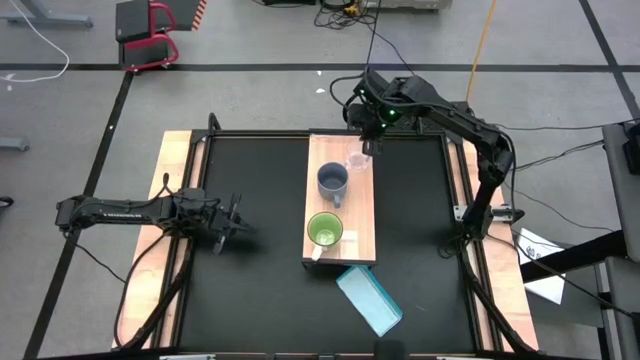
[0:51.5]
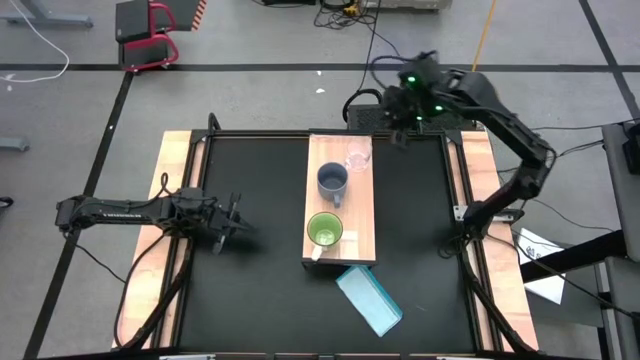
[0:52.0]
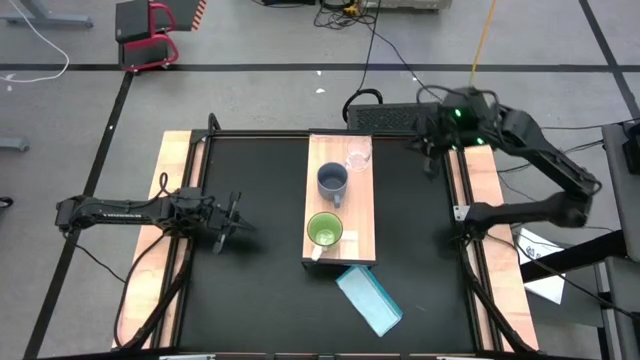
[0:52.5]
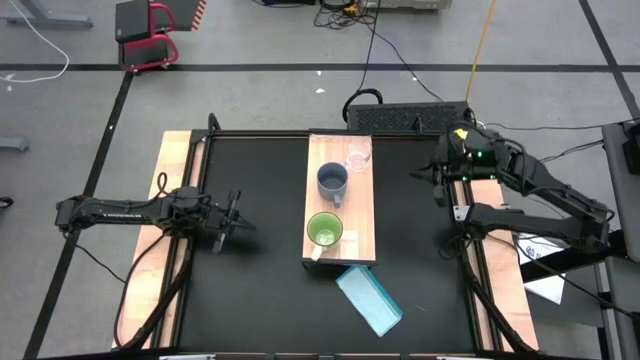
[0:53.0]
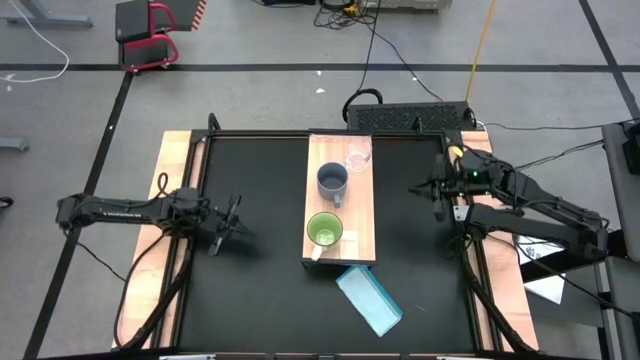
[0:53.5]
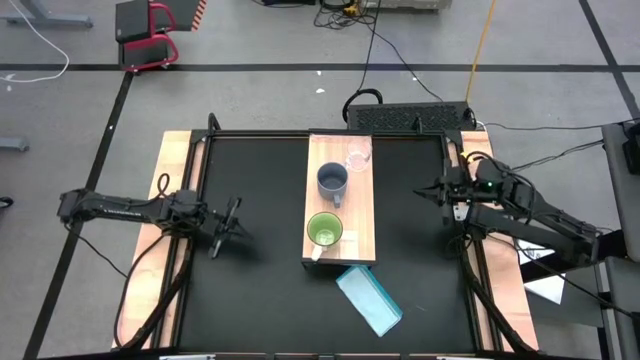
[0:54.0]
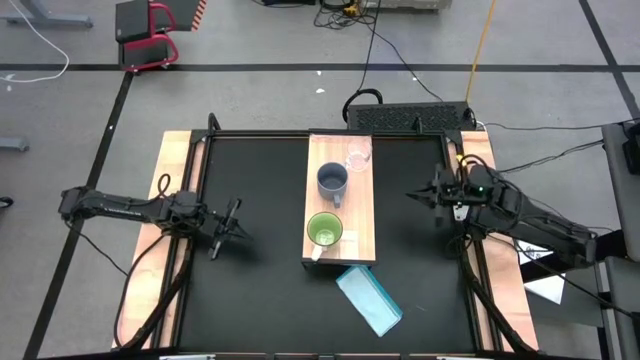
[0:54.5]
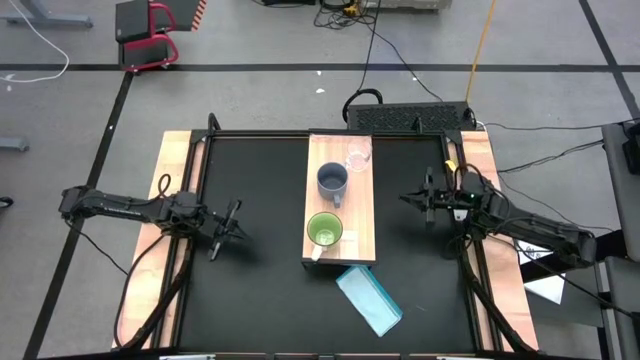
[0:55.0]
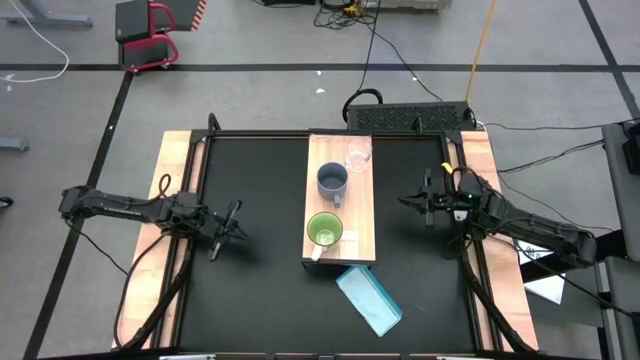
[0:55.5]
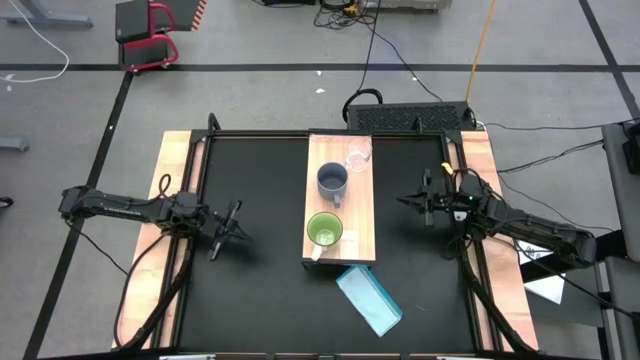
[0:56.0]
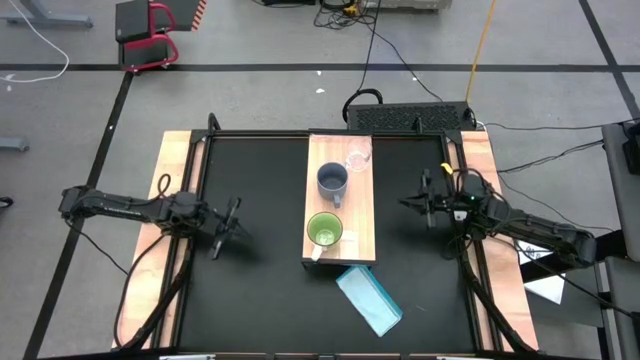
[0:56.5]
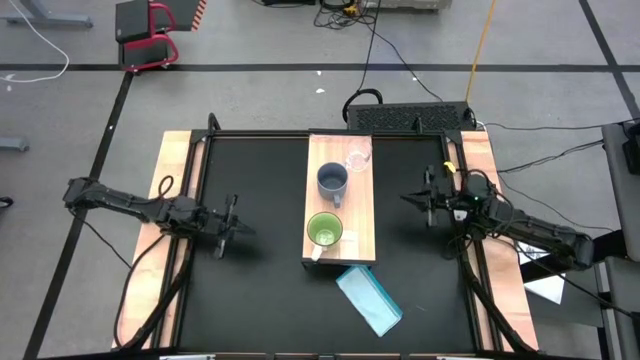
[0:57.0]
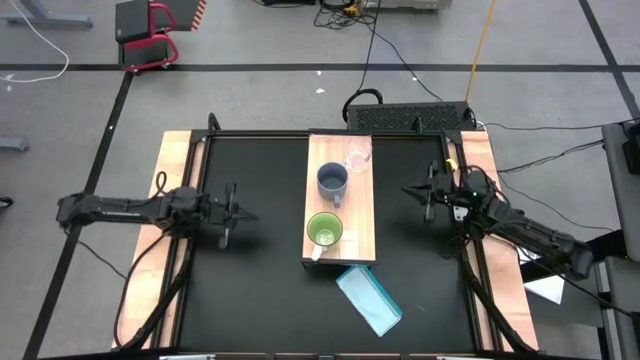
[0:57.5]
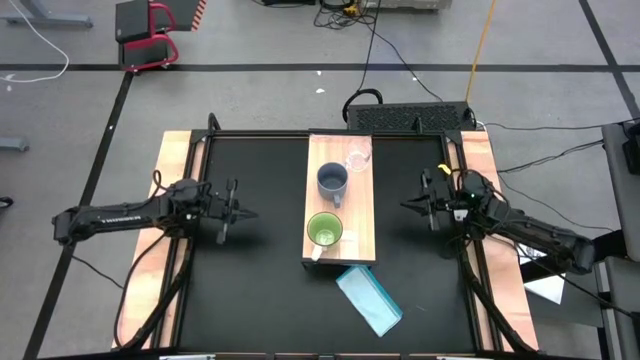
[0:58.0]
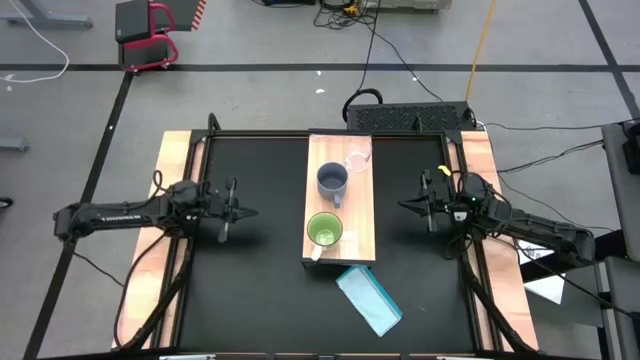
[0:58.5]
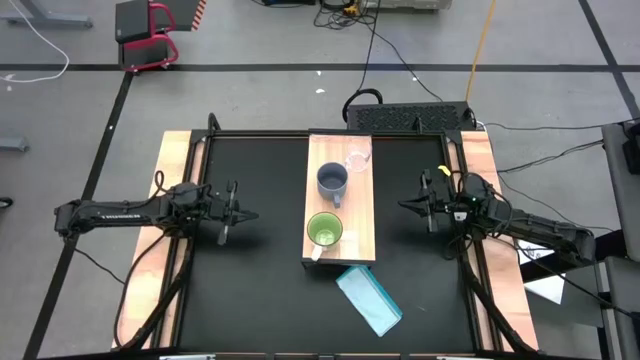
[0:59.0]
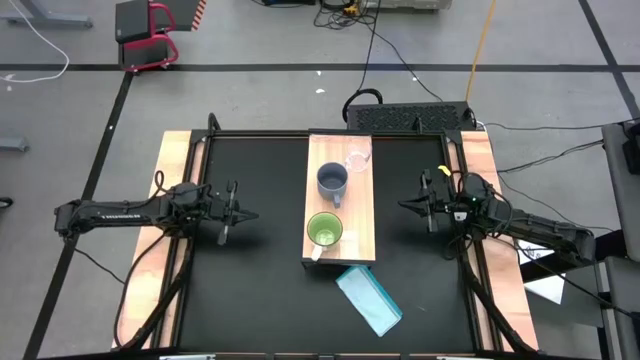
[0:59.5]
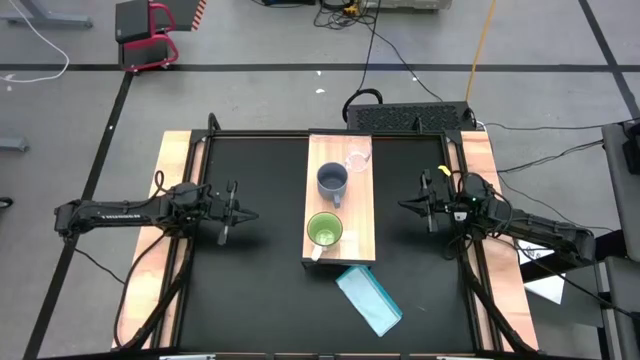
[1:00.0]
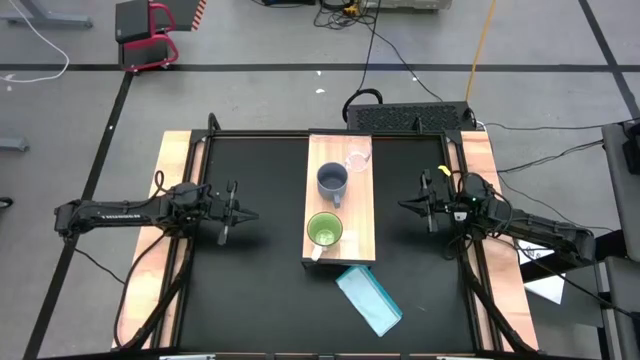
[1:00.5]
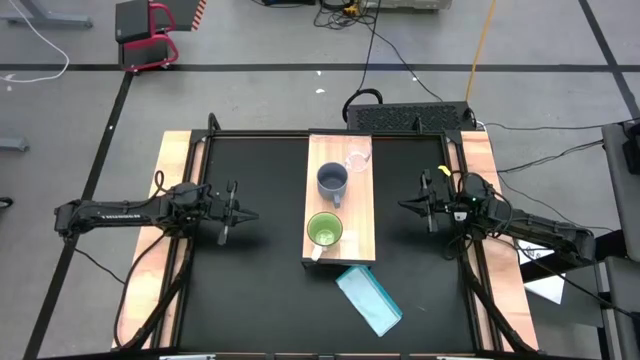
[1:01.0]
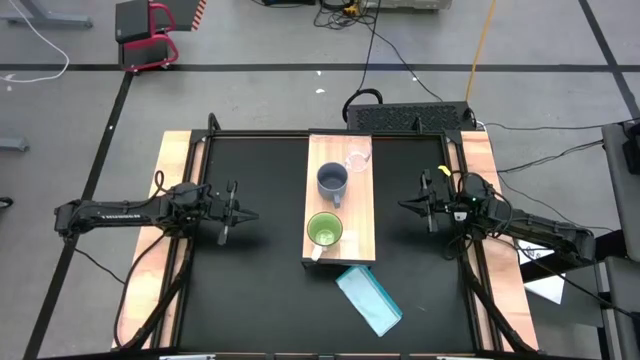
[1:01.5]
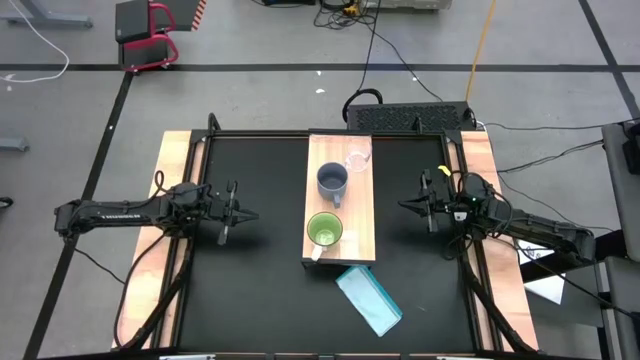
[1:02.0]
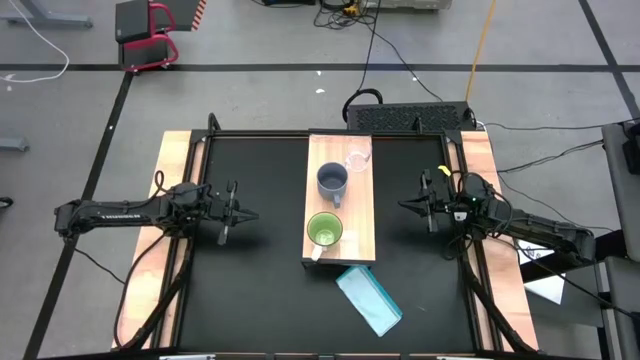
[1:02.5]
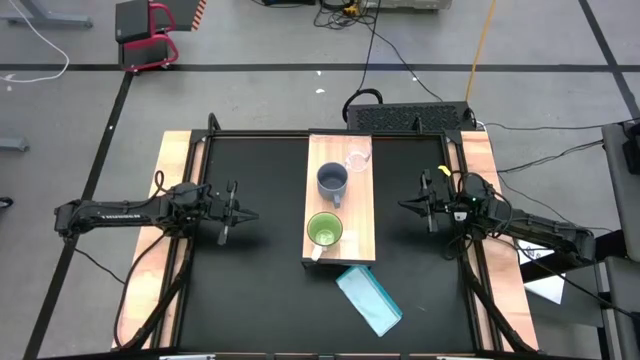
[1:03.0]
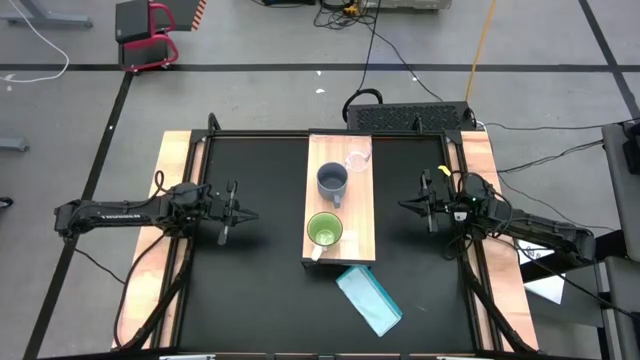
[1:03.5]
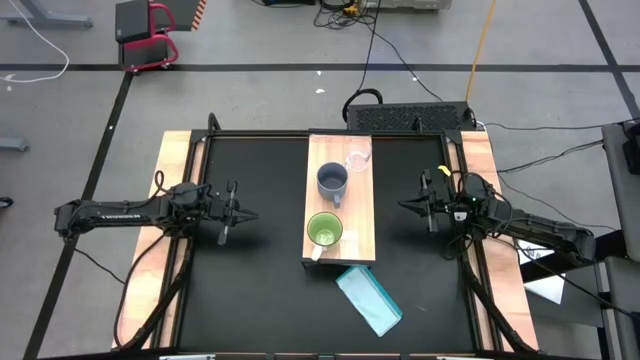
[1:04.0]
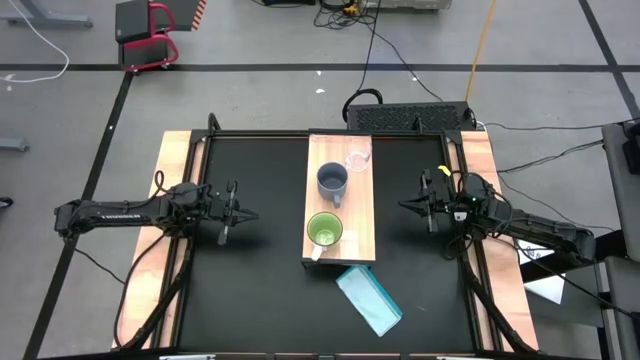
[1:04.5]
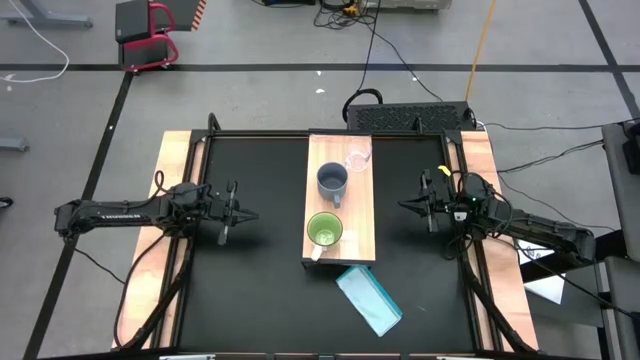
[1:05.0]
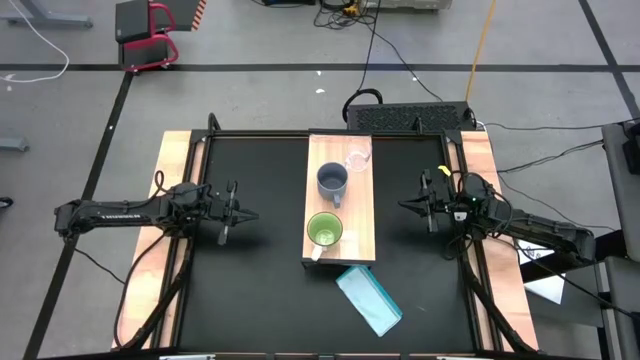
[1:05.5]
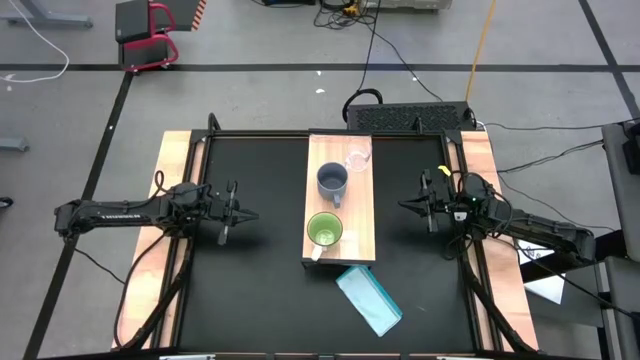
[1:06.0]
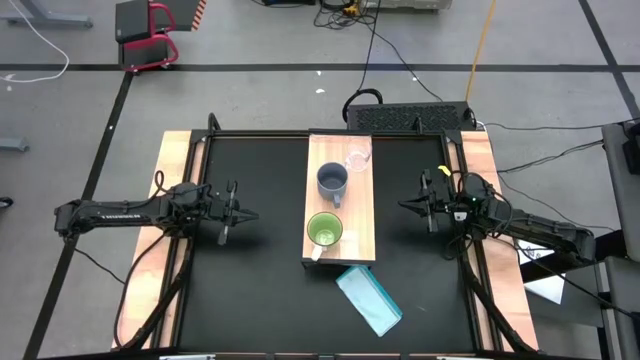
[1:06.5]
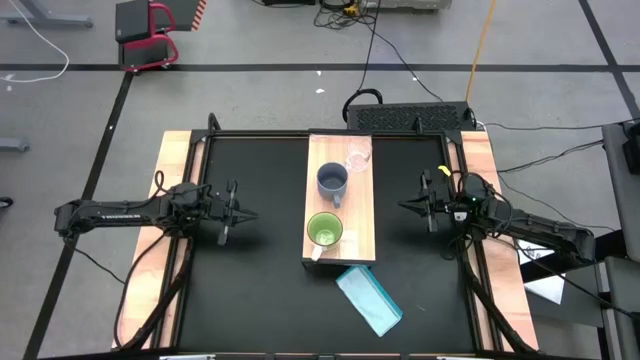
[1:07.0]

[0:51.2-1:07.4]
Task: Stack small to large cups/mugs on shelf
Return to Home Position

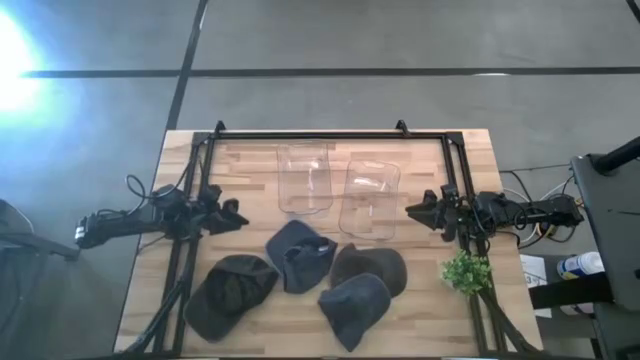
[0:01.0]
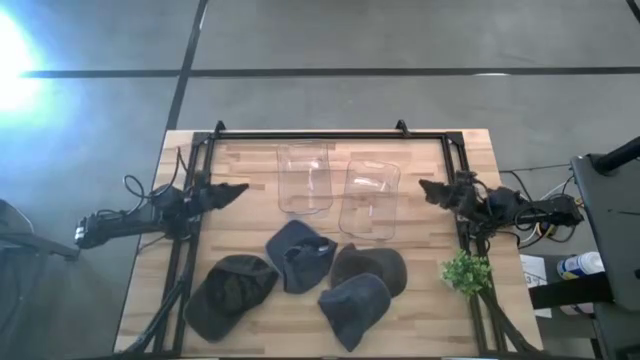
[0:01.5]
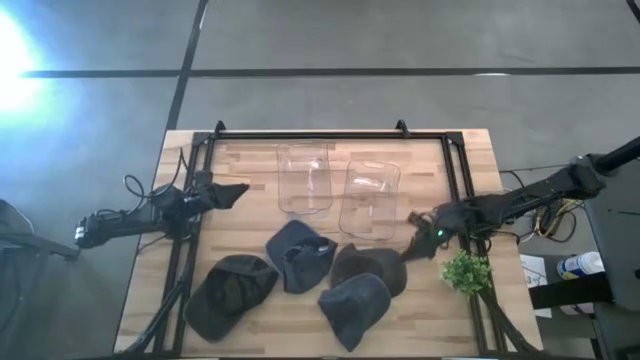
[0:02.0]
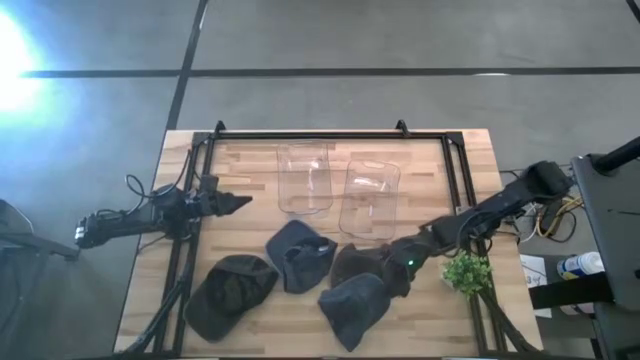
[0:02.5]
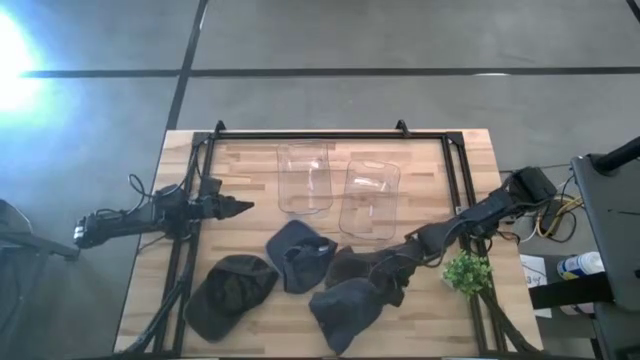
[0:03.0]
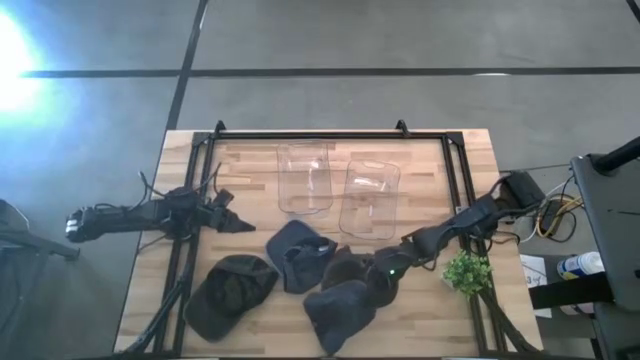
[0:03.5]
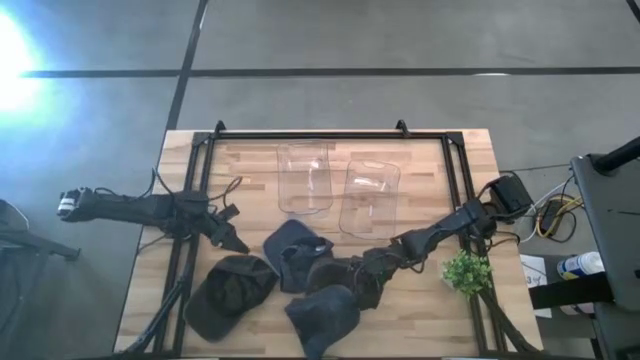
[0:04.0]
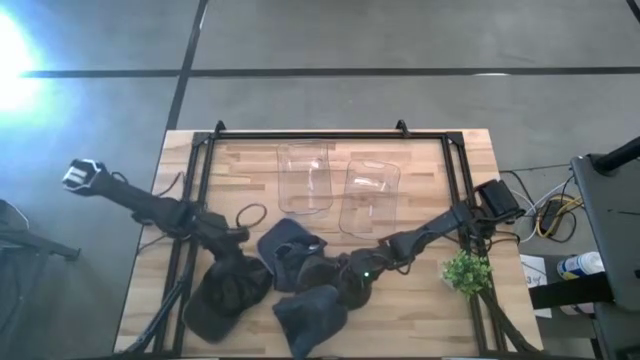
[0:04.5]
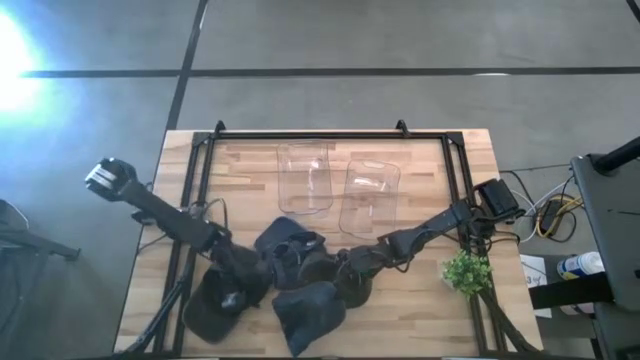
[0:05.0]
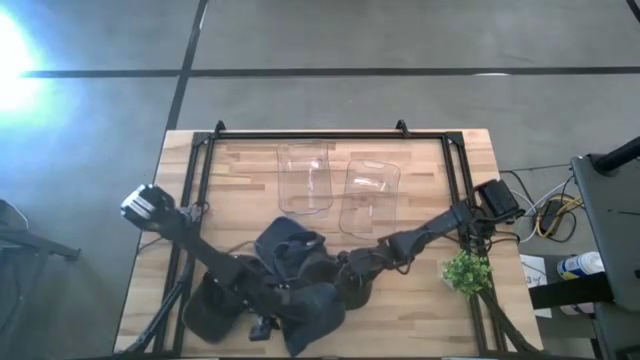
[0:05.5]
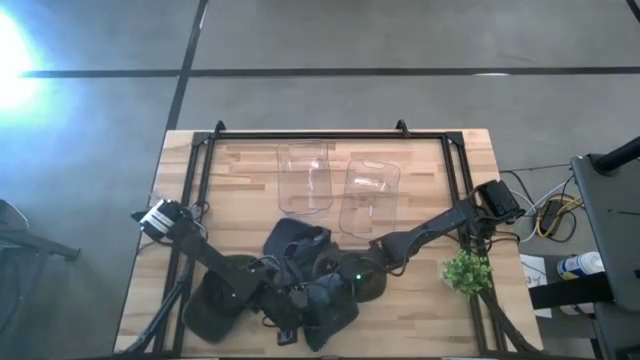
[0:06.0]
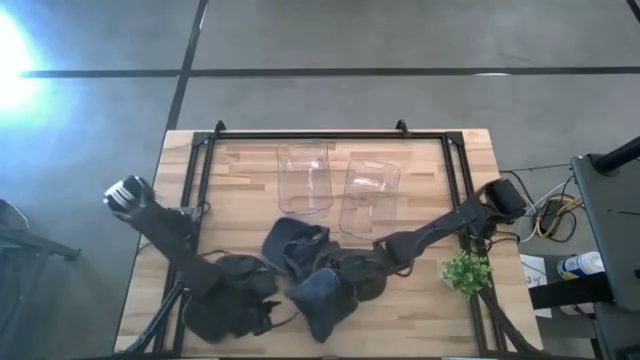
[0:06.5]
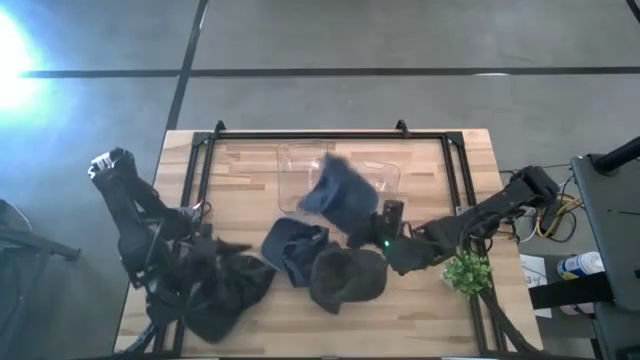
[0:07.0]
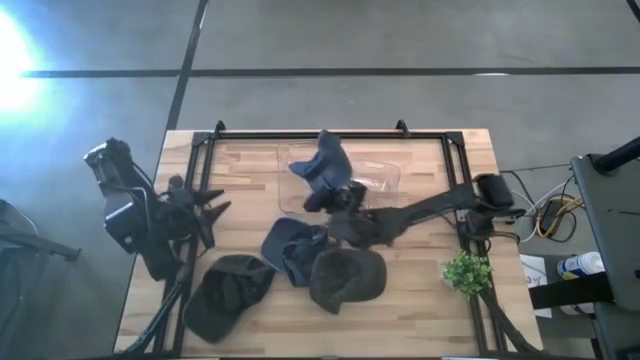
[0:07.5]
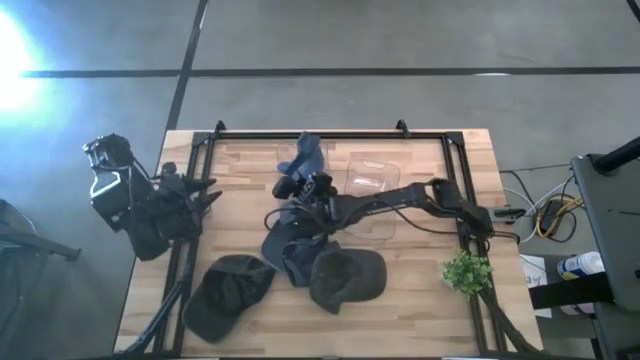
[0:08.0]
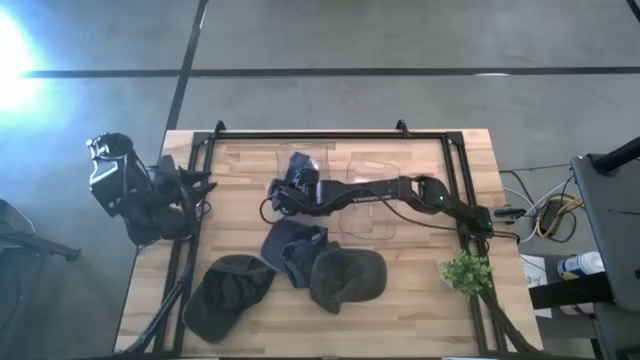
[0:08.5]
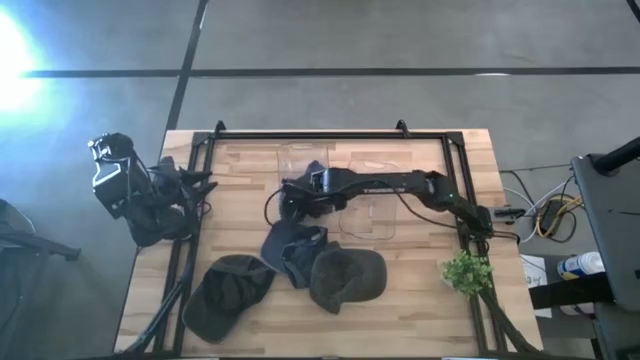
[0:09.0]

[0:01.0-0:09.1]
Task: Pick & Place hat
Put the bottom blue cap into the left transparent bin
